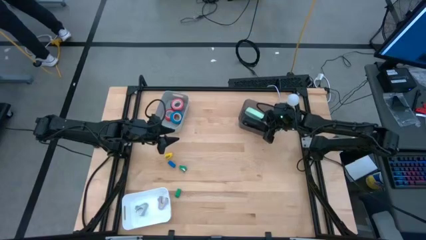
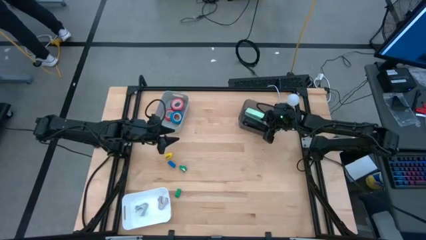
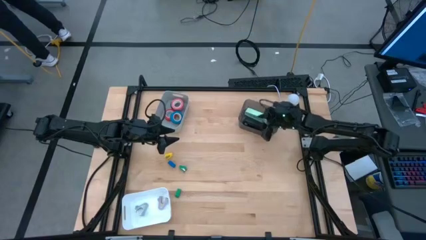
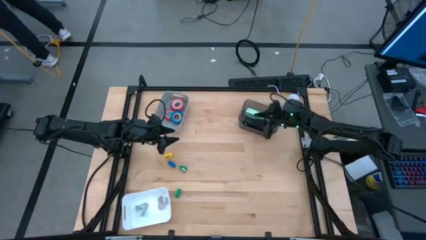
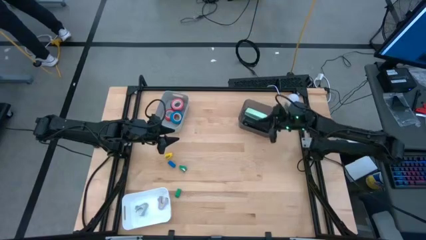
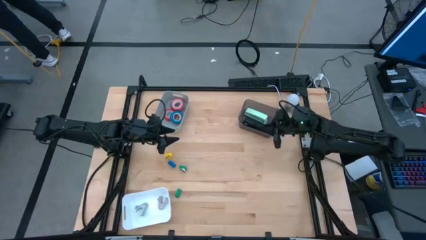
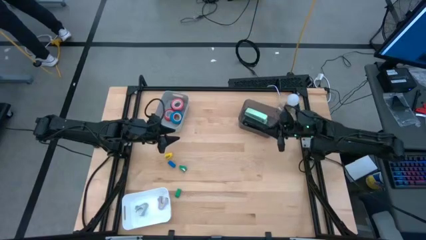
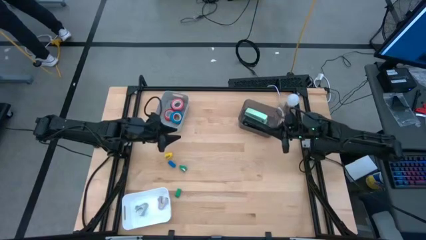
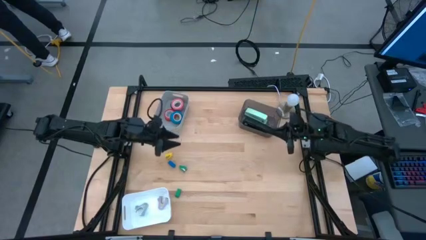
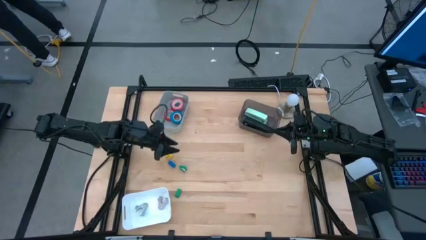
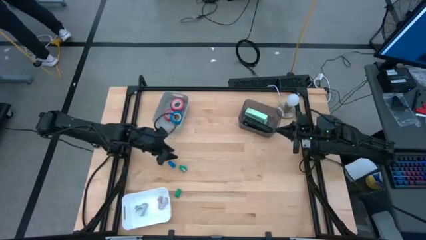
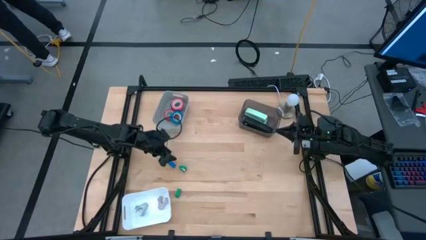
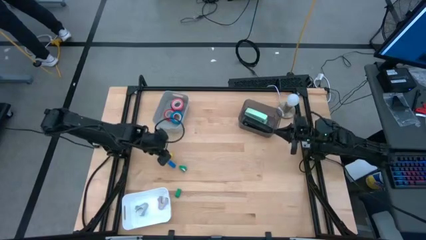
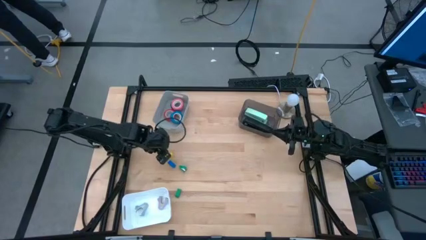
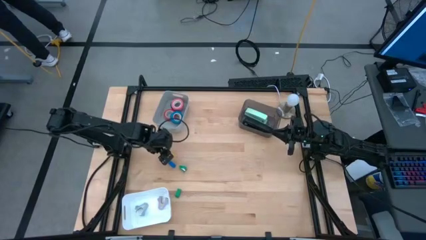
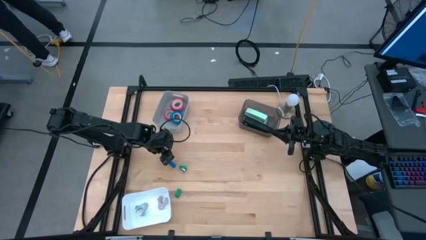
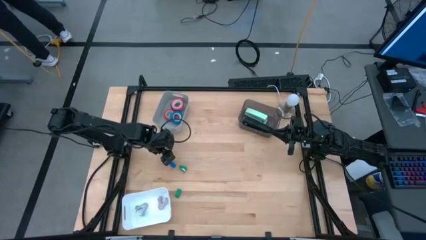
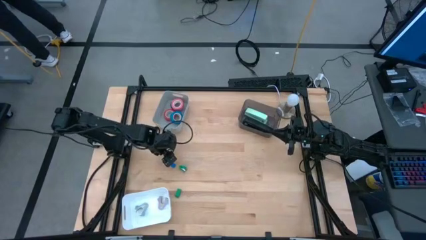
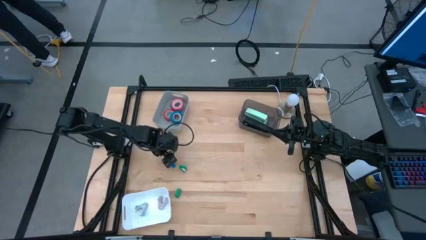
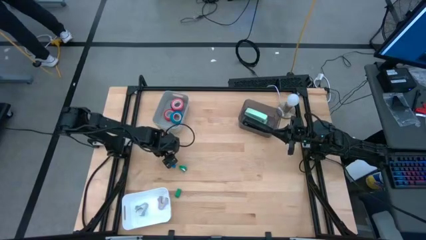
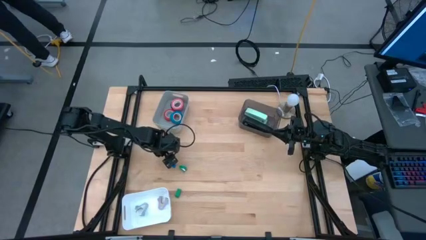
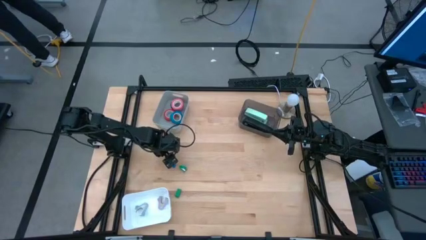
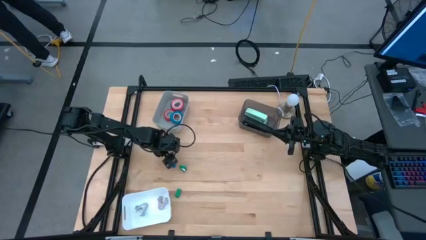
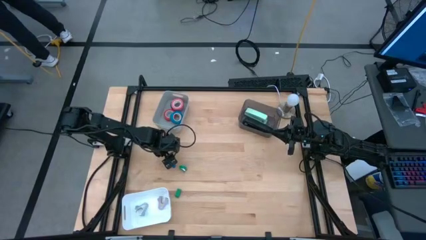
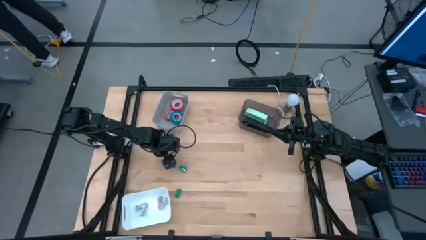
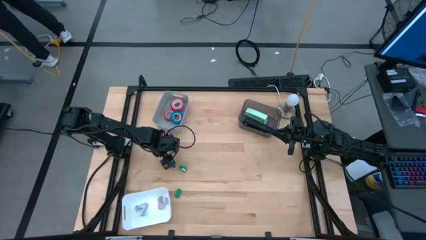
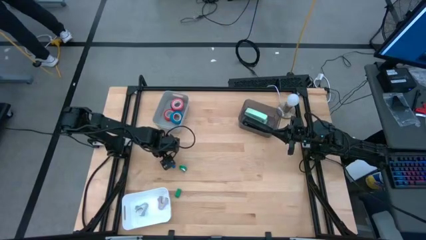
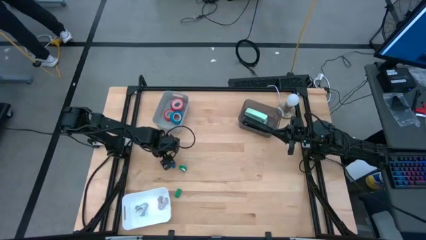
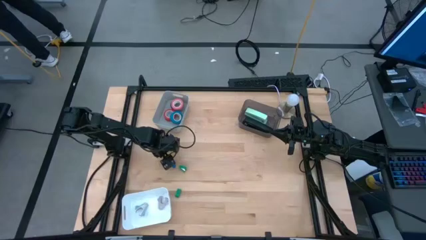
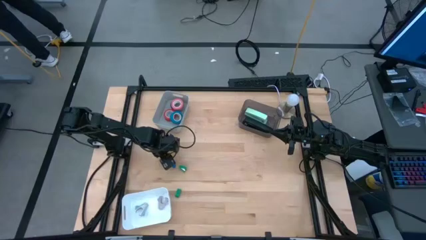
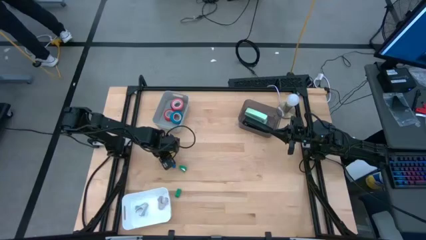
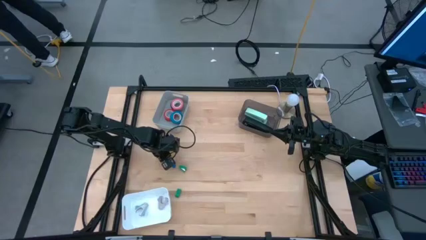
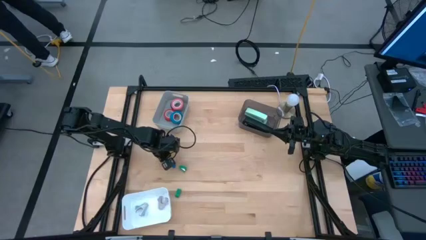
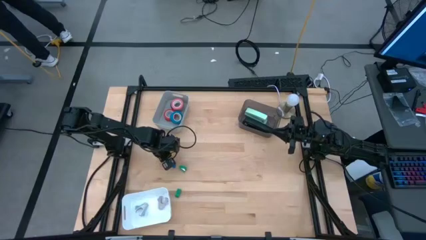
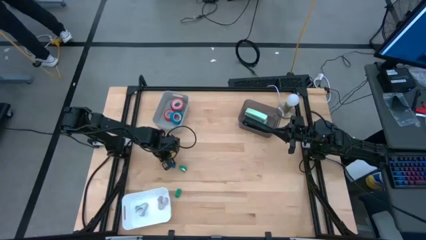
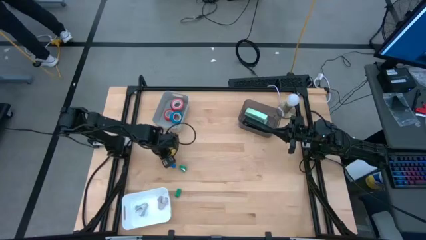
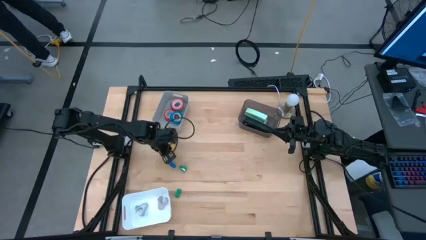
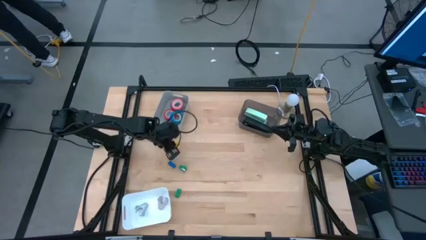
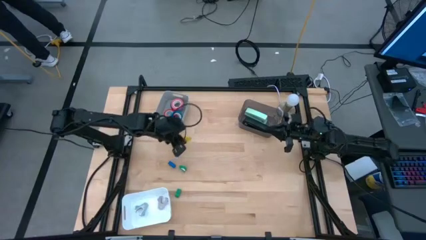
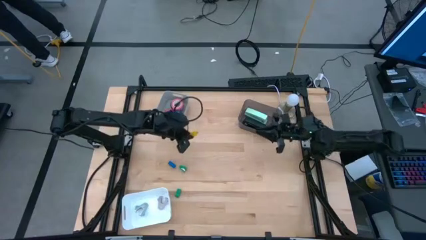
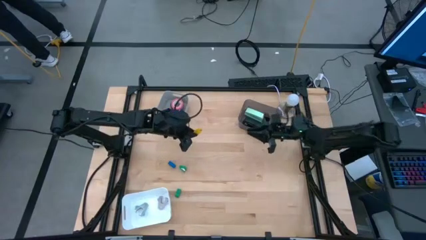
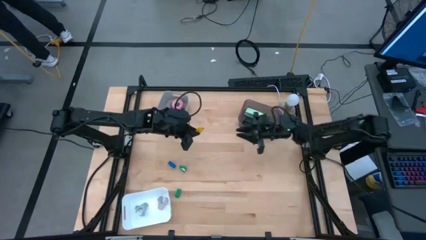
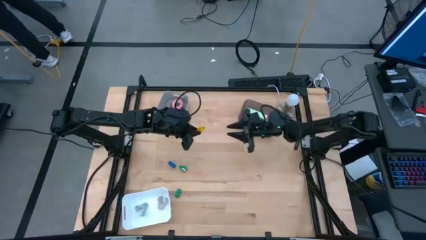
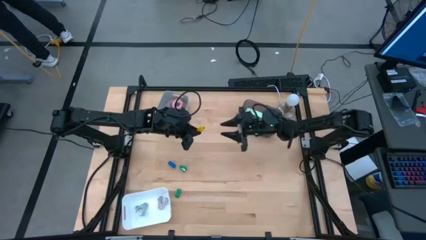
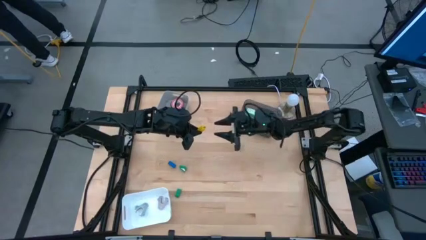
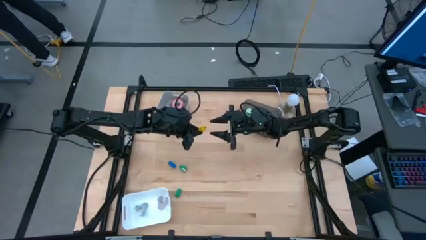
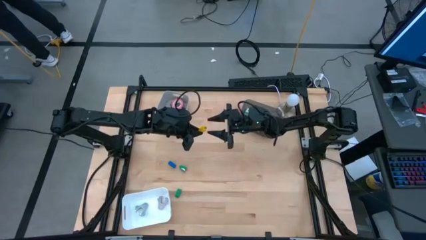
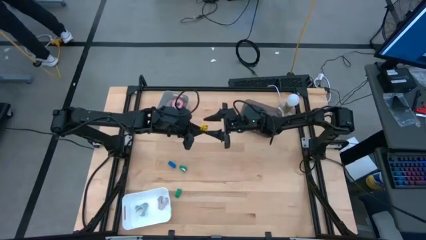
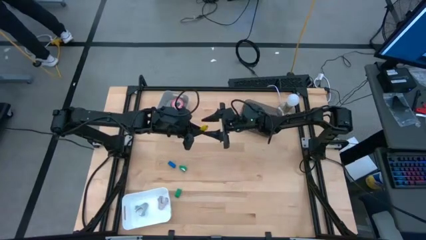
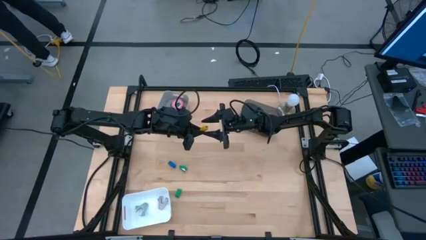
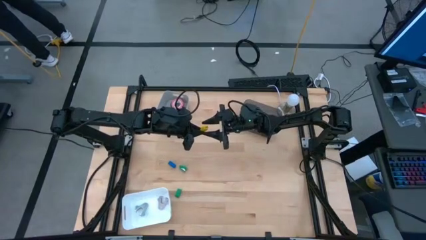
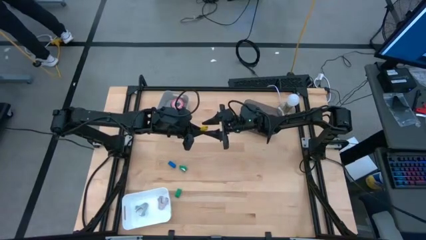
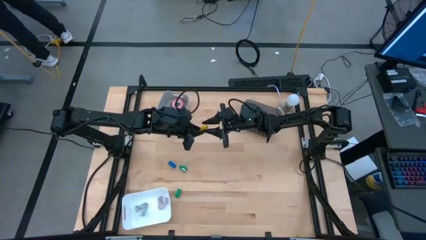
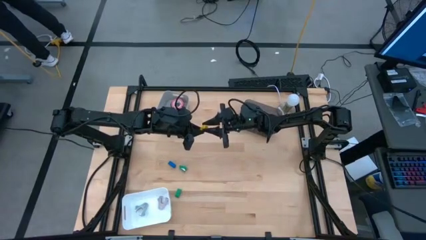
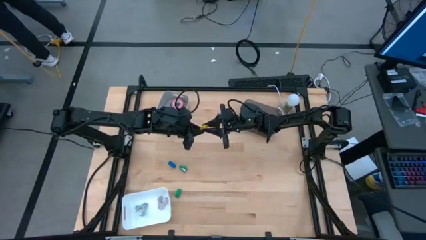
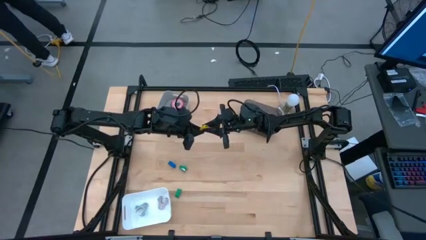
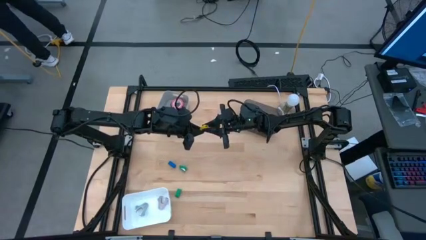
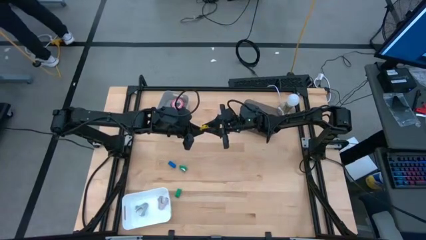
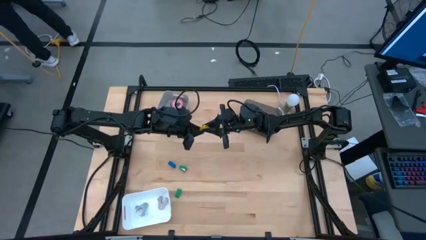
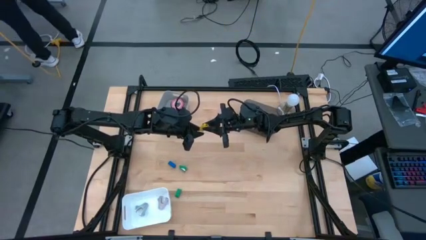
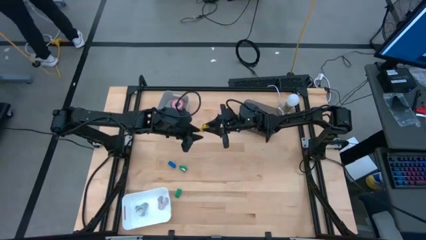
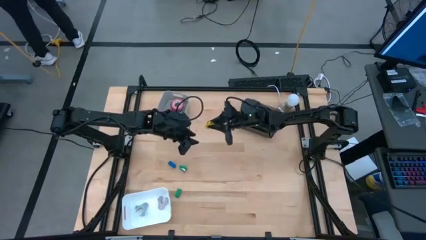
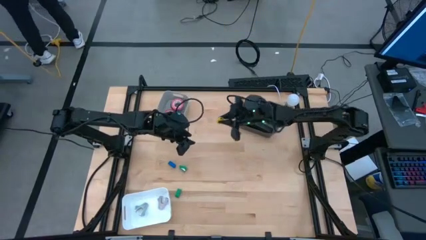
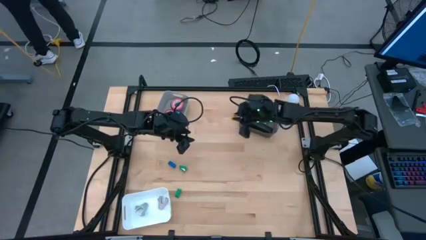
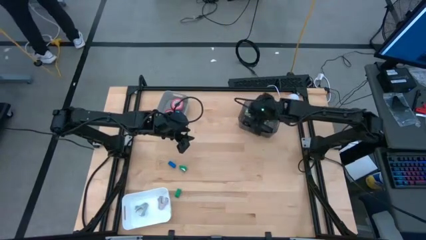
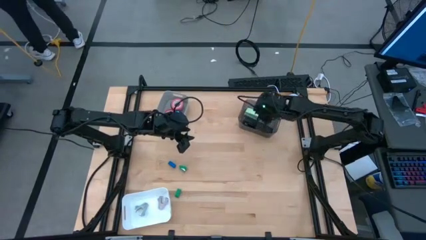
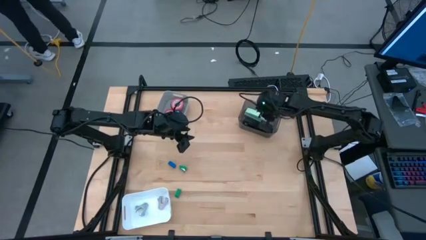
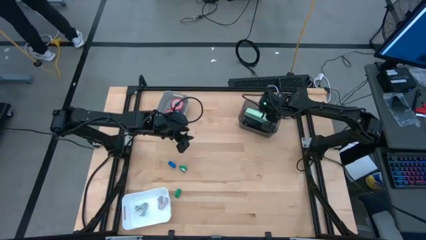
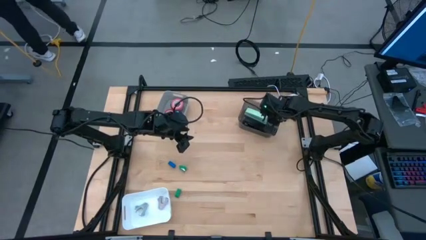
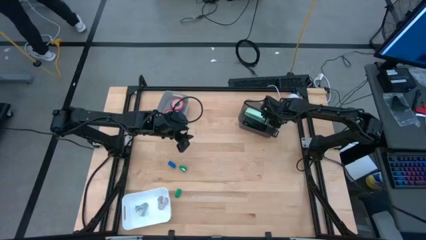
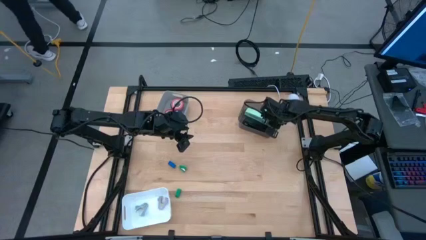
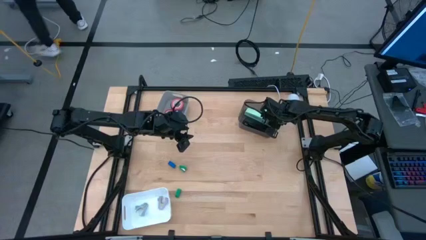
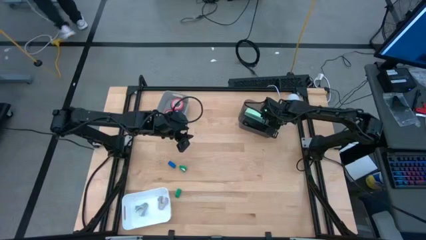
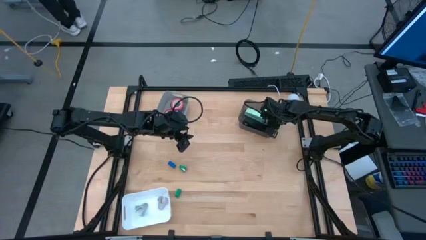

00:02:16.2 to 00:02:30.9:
Task: Pick and place Stapler, Stapler remover, tape
Put the yellow stapler into the black bin
